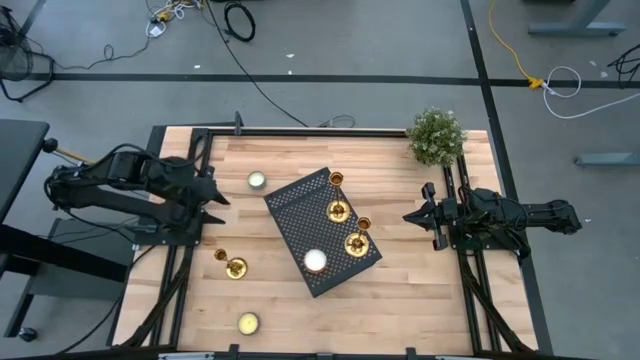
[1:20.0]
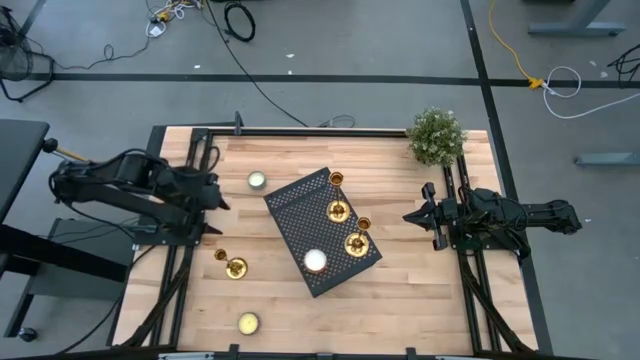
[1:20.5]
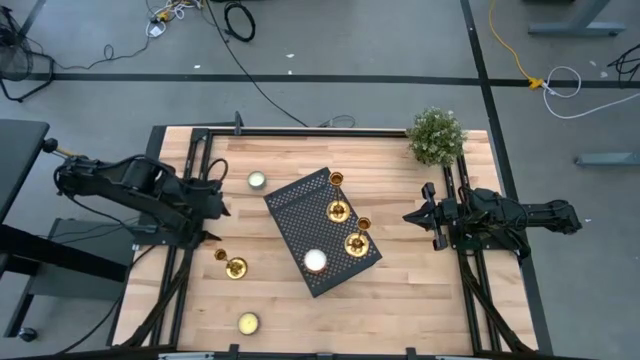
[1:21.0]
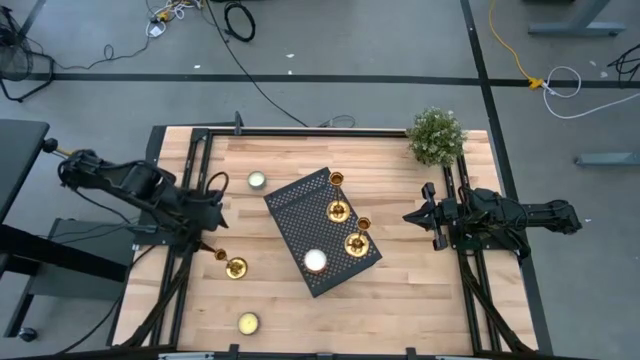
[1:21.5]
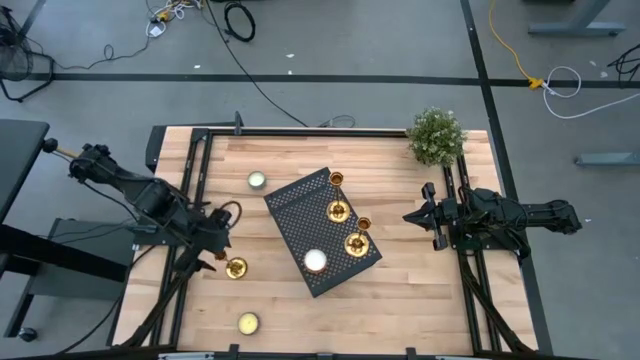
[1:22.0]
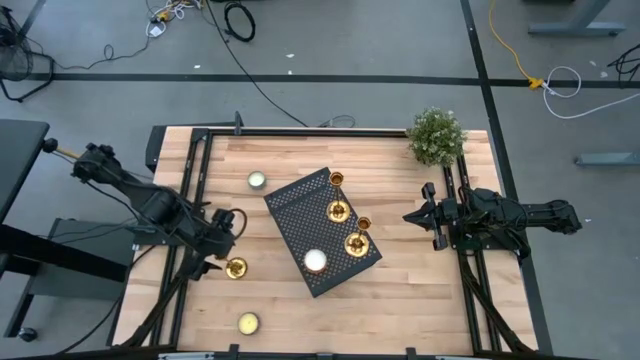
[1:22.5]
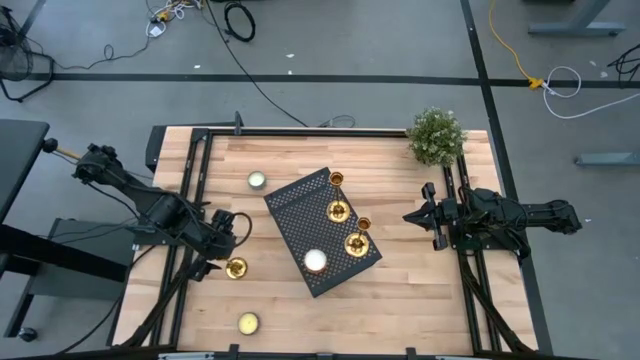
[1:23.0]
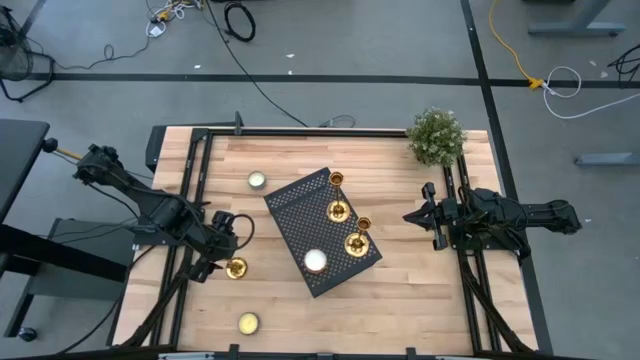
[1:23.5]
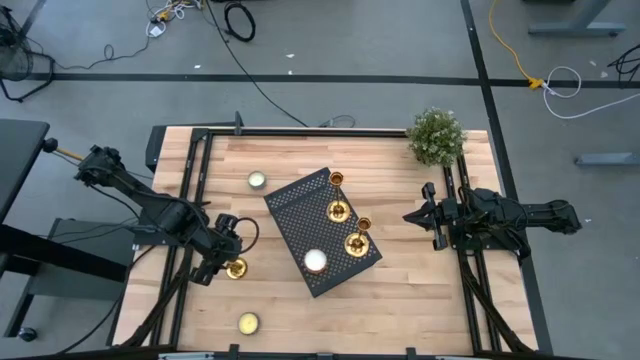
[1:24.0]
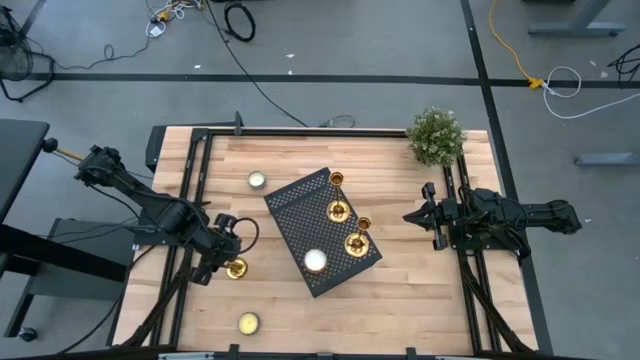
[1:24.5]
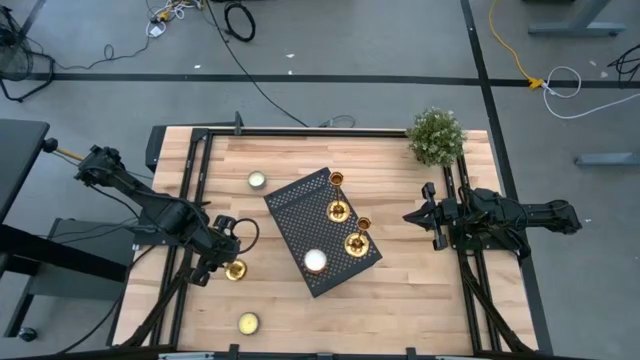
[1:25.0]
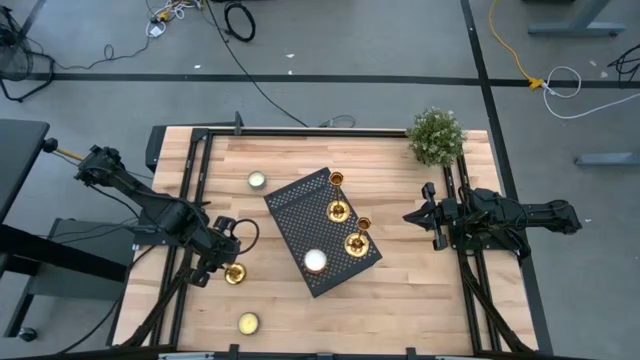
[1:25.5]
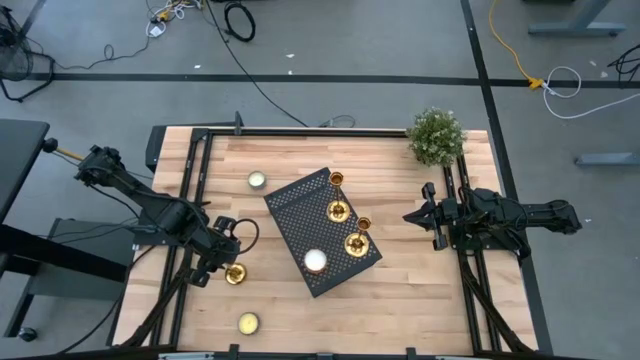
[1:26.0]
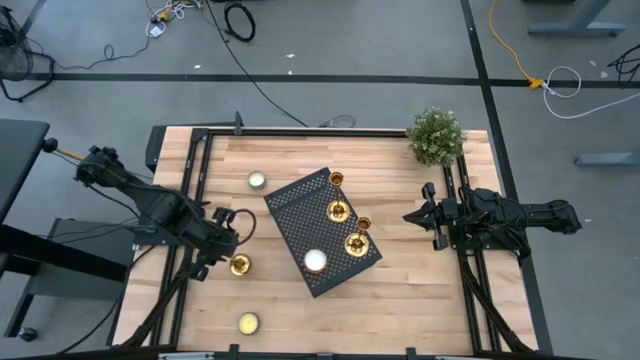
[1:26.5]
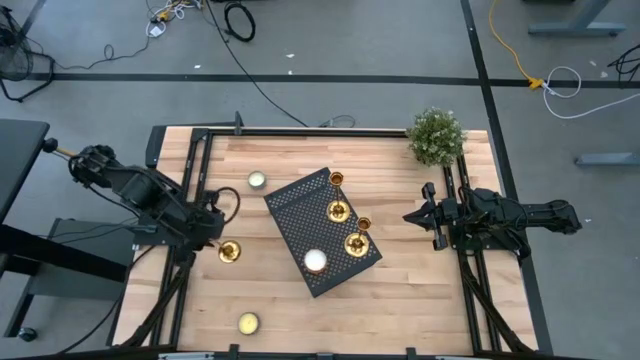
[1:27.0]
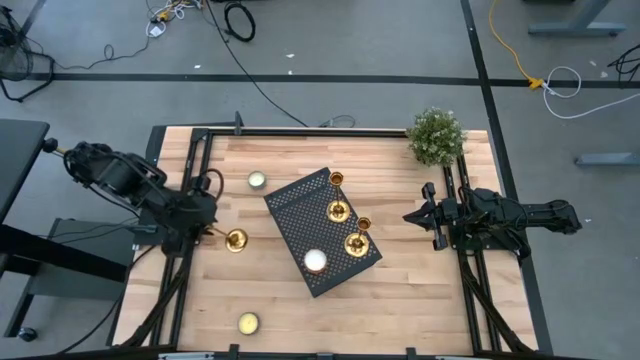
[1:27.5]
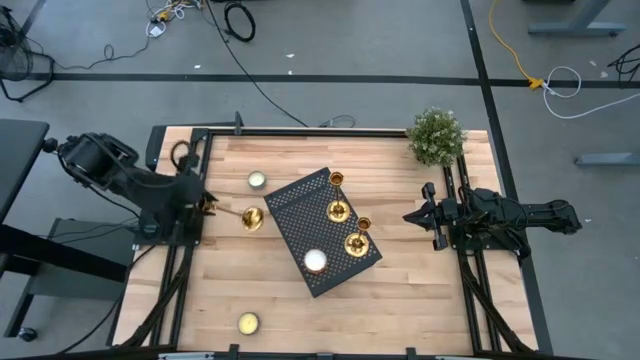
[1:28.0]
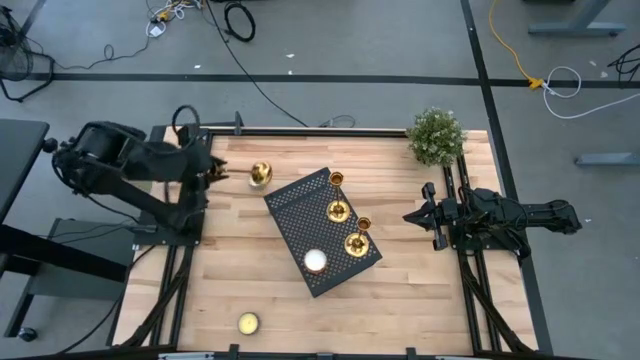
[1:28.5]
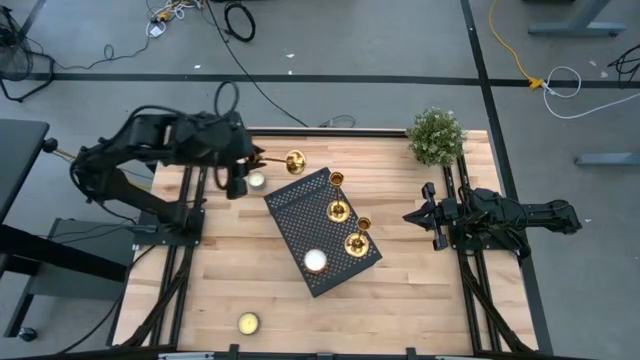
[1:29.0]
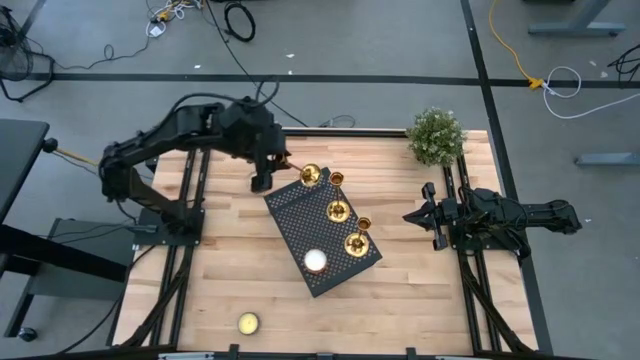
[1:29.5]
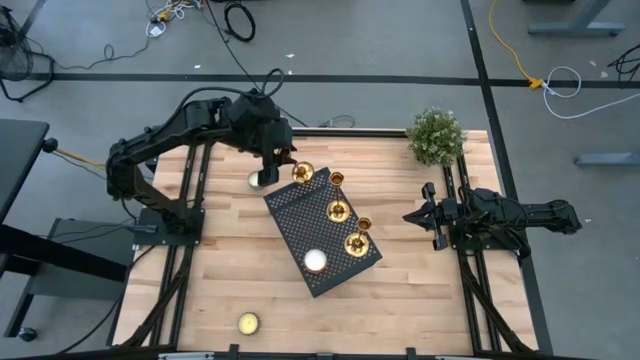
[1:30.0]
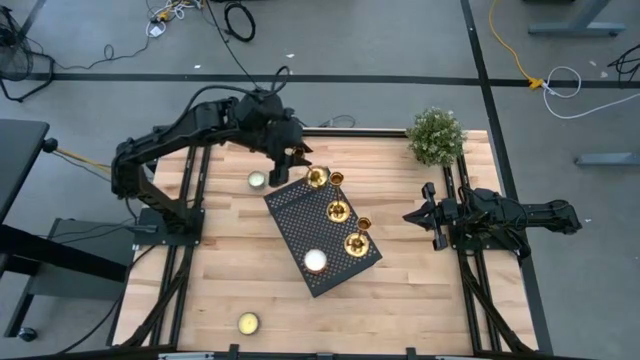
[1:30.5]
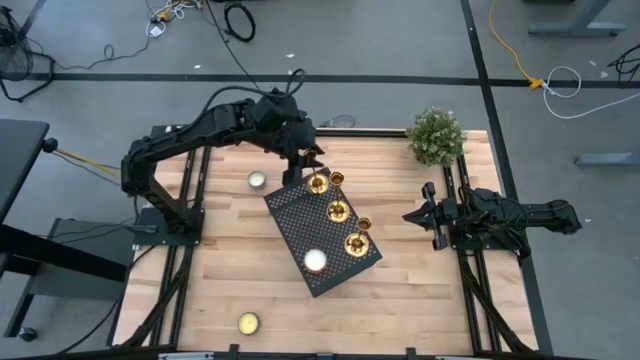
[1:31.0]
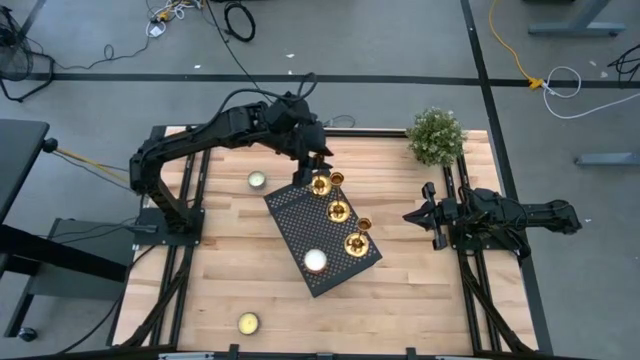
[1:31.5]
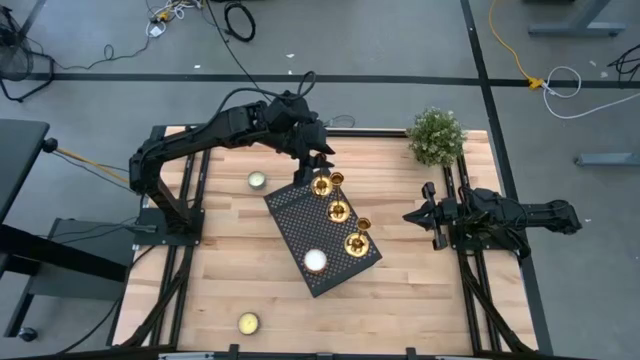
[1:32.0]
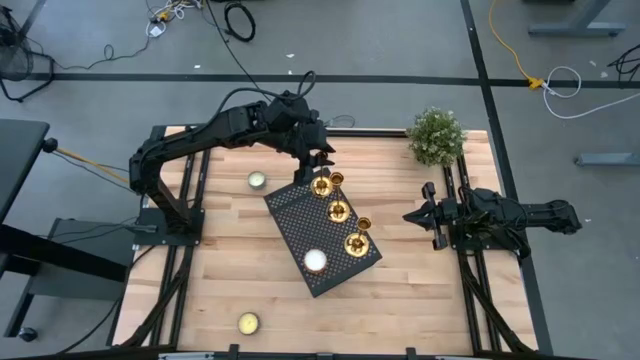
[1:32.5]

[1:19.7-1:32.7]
Task: Pick & Place candle stick holders
Put the gold candle holder on the shelf aligned with the other candle holders

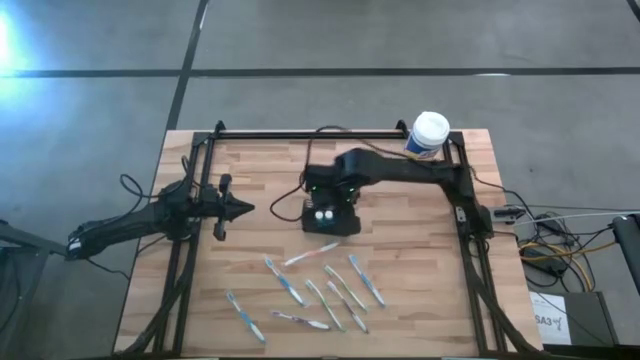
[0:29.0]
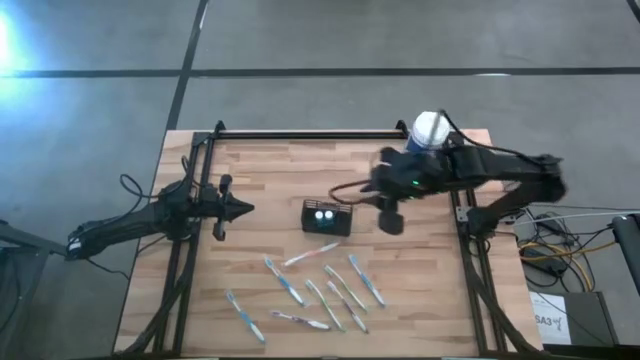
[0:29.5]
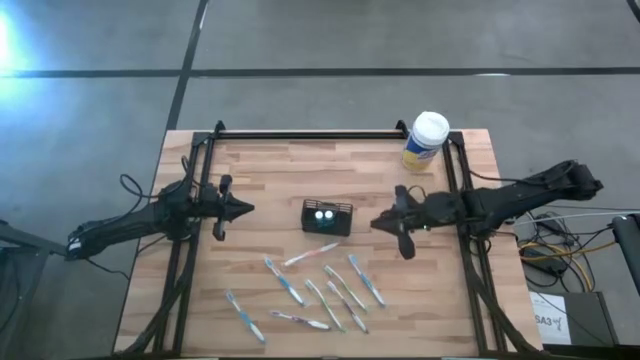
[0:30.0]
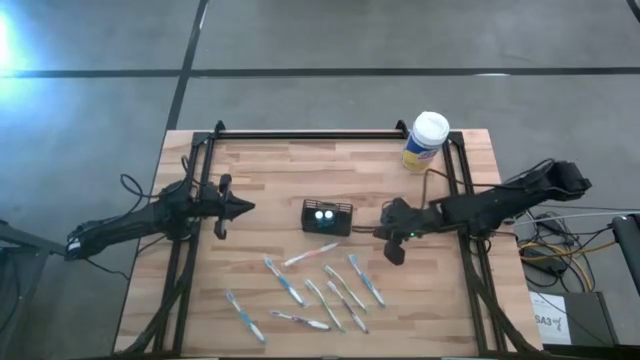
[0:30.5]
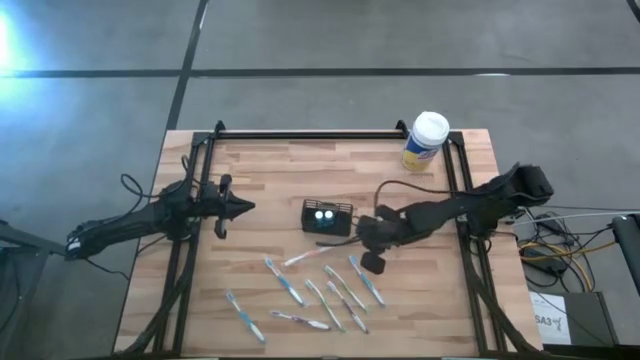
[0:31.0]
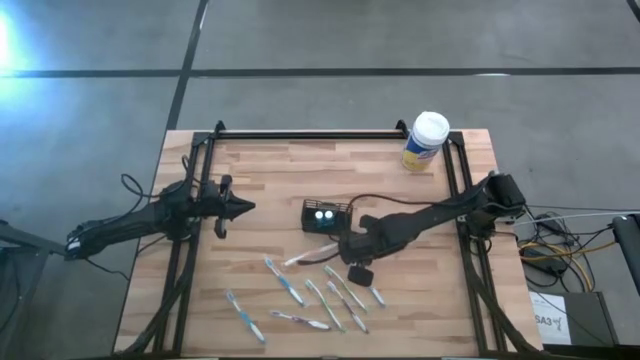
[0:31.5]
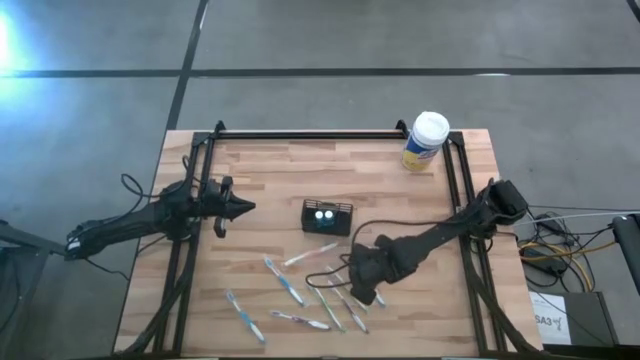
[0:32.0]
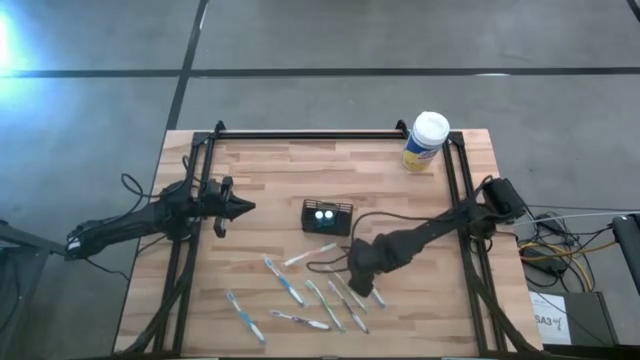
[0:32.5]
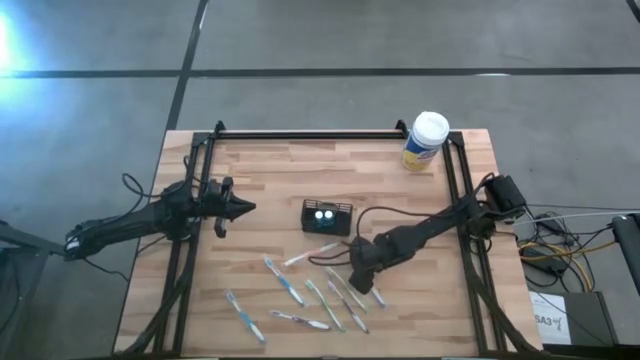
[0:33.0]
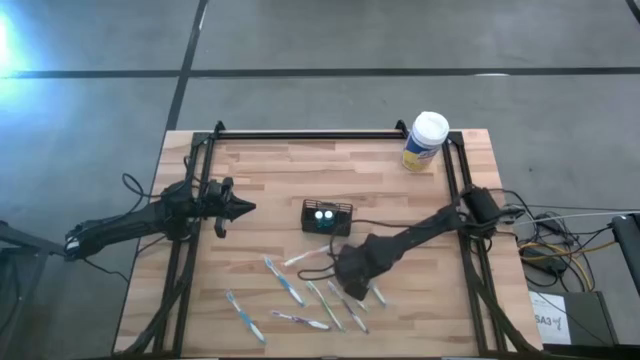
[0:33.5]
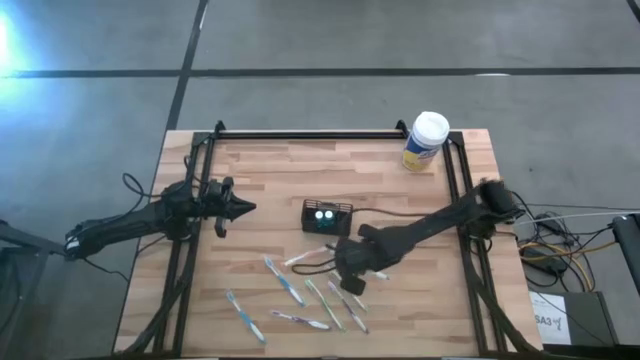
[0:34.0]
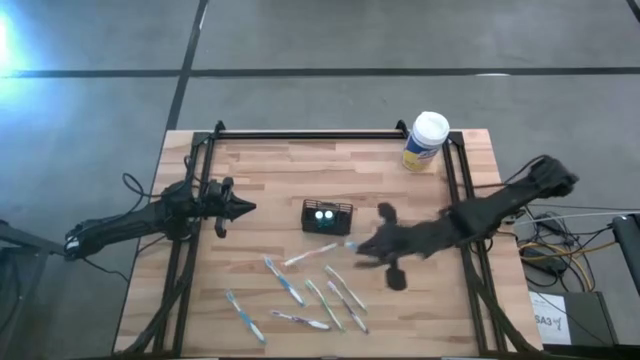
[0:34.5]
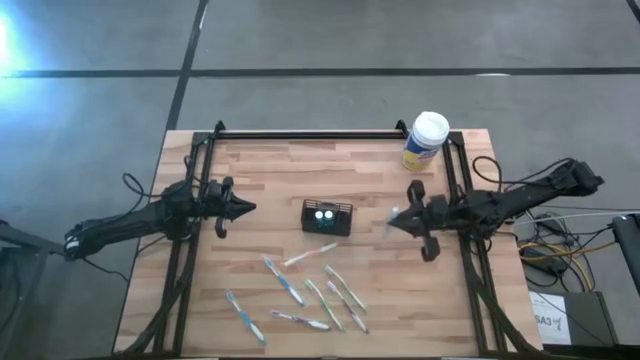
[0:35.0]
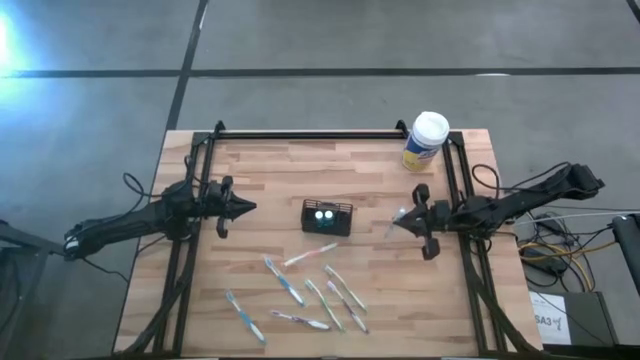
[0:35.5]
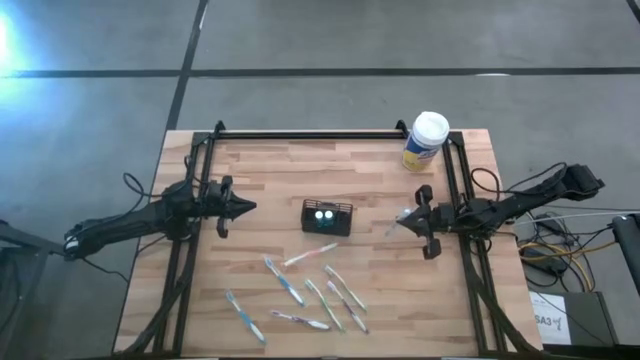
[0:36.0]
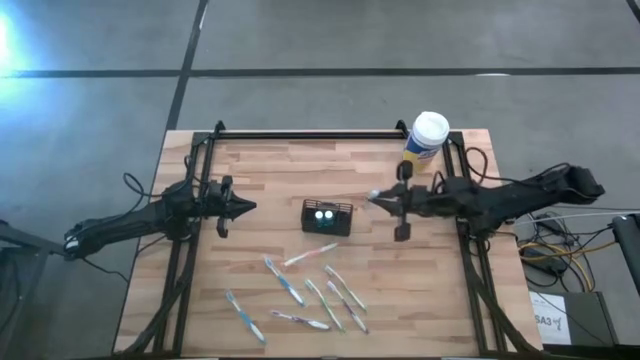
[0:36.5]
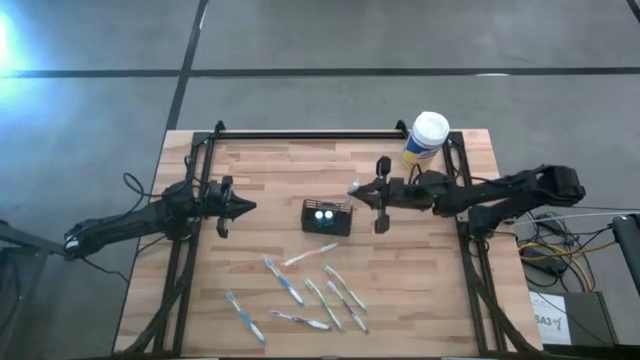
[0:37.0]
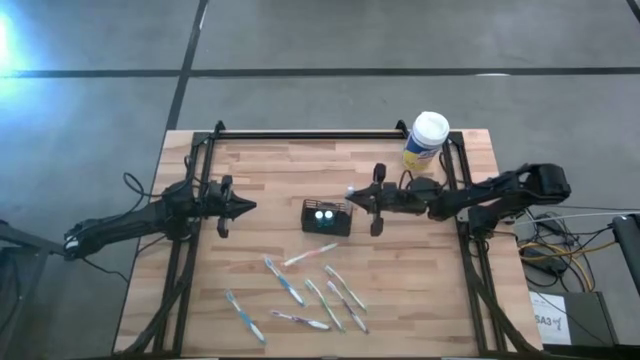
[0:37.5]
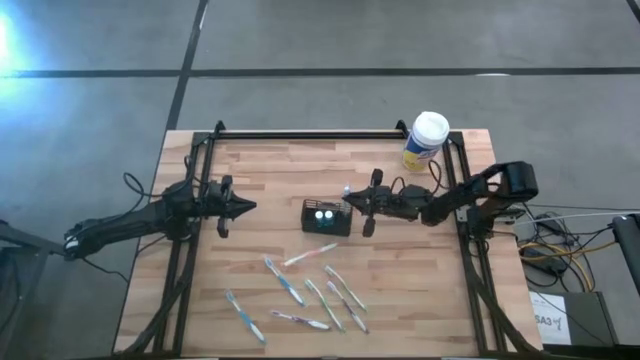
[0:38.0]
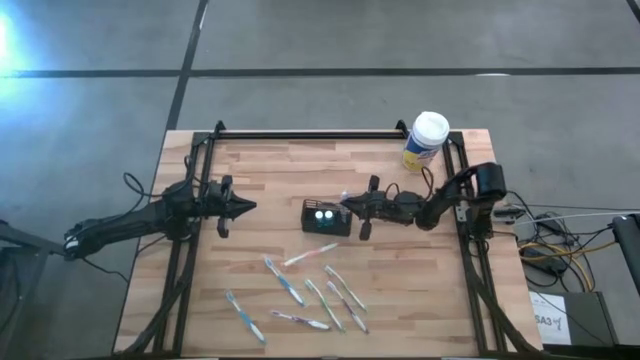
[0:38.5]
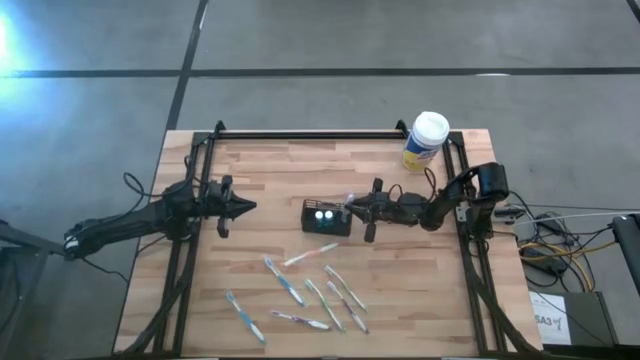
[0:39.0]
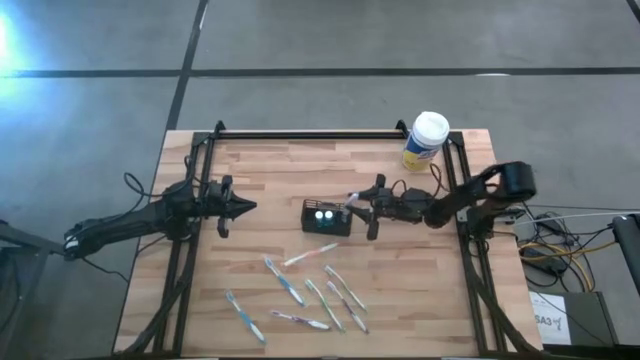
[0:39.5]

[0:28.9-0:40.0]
Task: Pick & Place toothbrushing station
Put the top right blue toothbrush into the black mesh organizer
